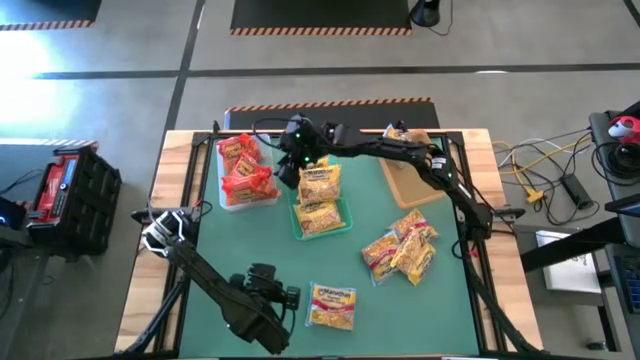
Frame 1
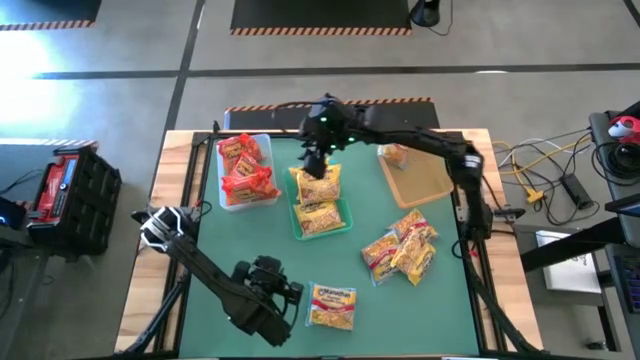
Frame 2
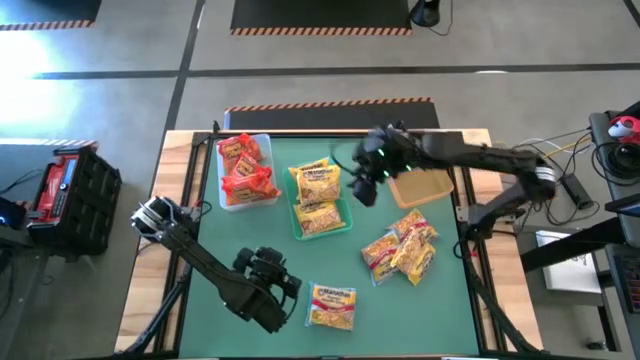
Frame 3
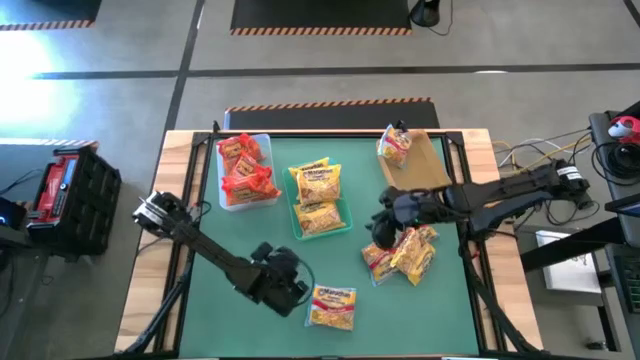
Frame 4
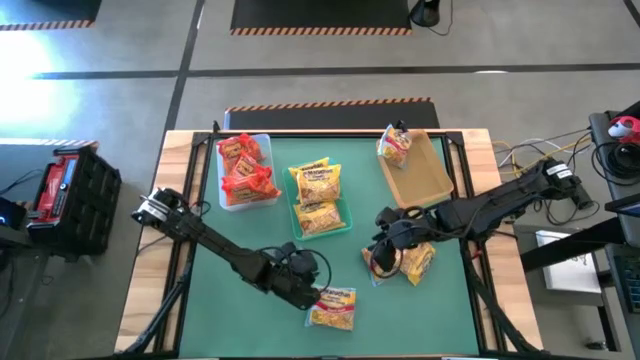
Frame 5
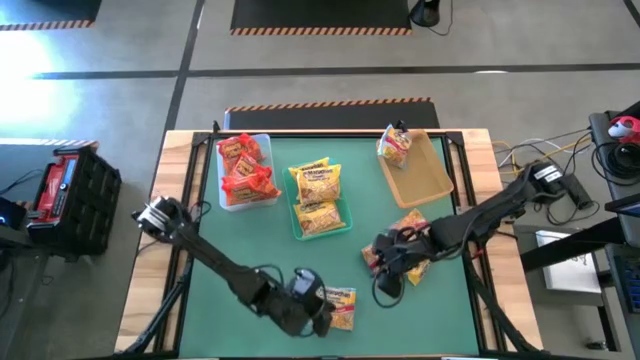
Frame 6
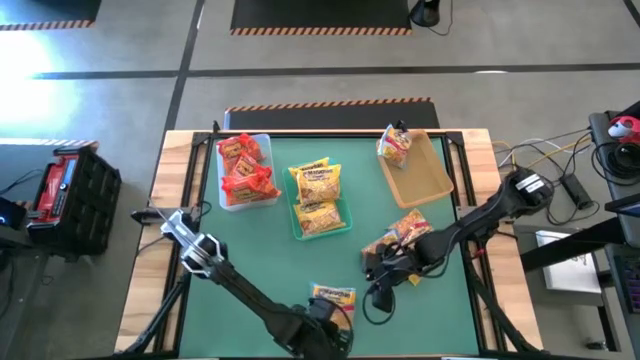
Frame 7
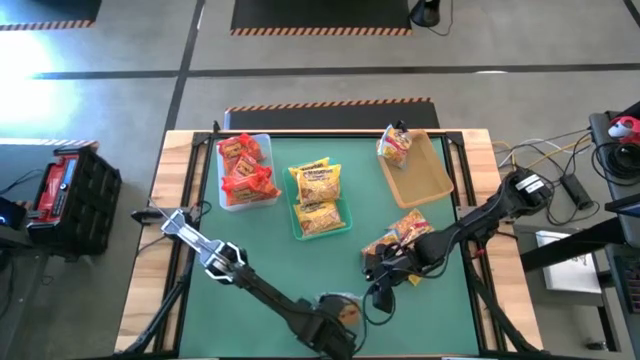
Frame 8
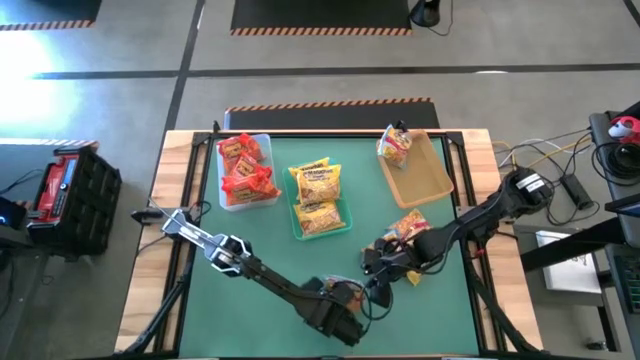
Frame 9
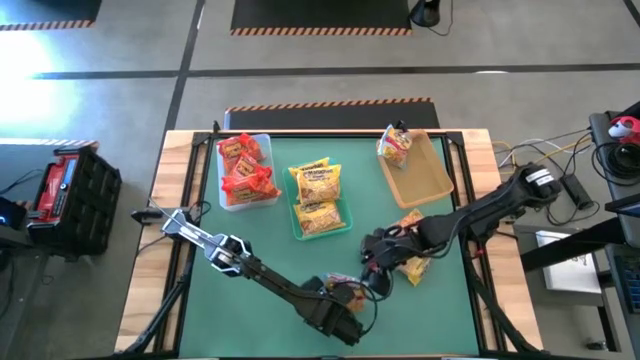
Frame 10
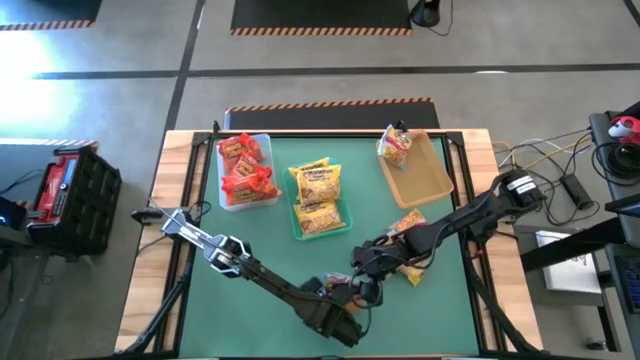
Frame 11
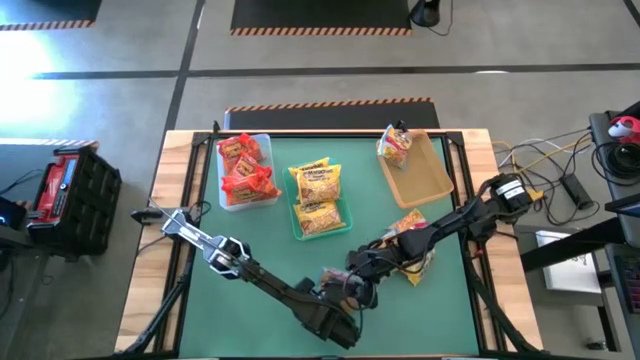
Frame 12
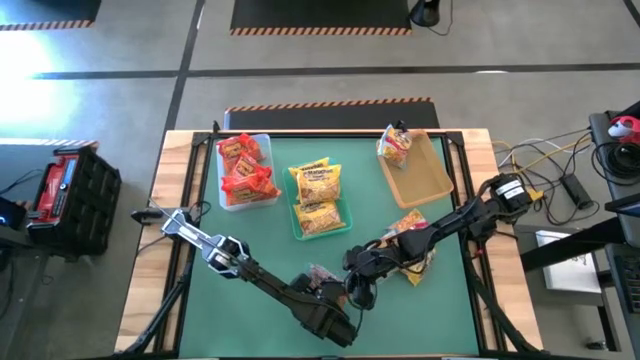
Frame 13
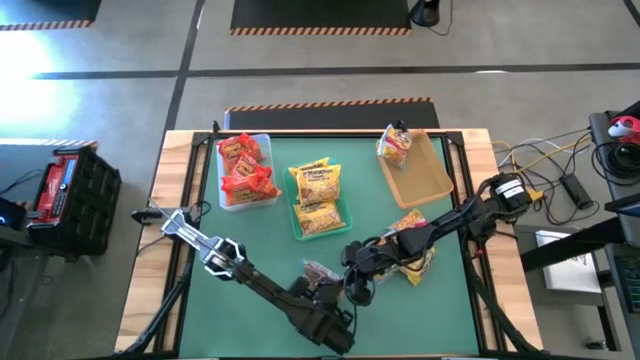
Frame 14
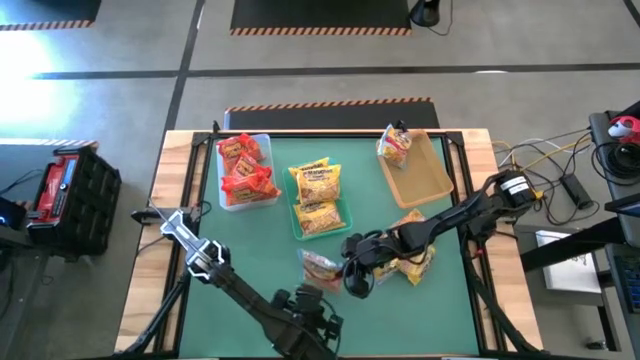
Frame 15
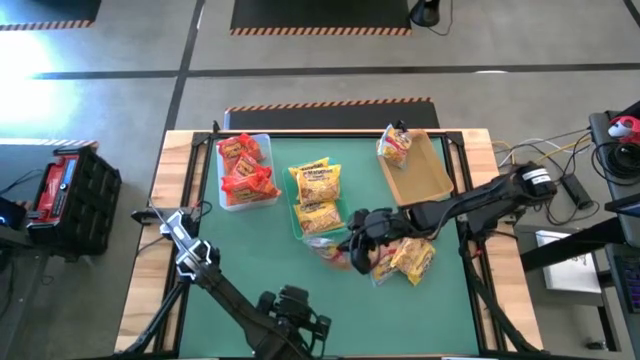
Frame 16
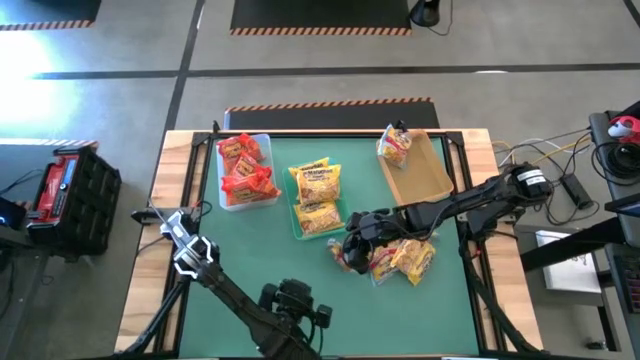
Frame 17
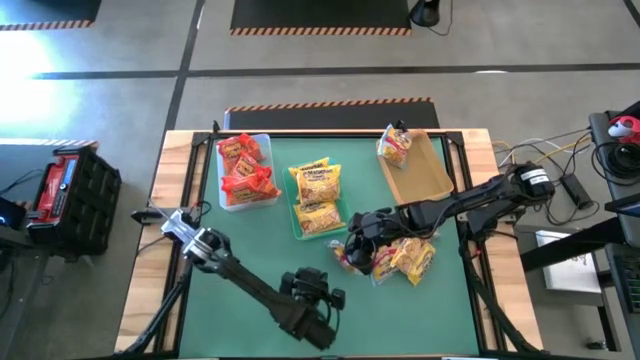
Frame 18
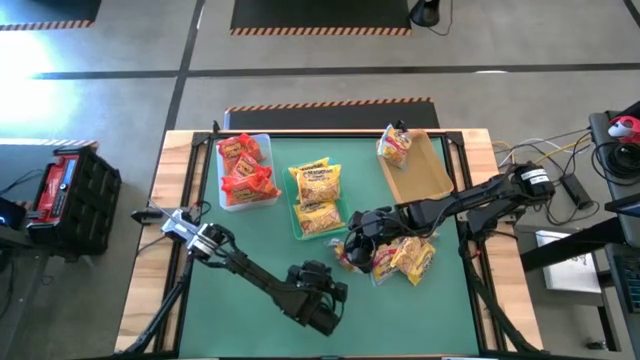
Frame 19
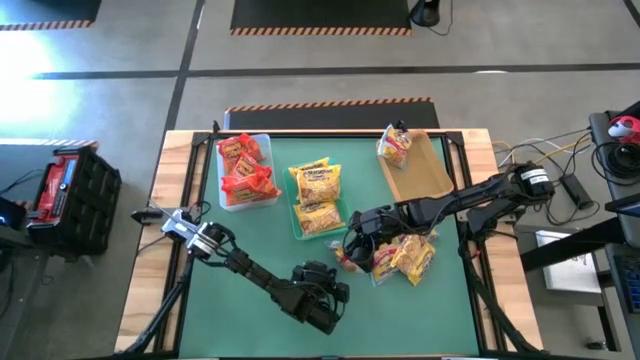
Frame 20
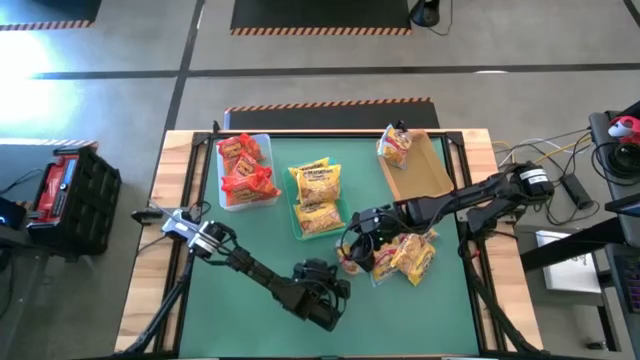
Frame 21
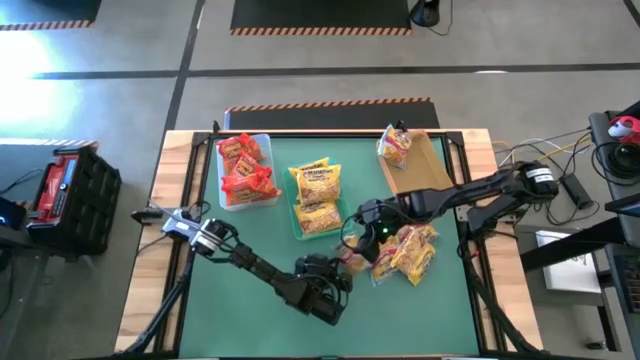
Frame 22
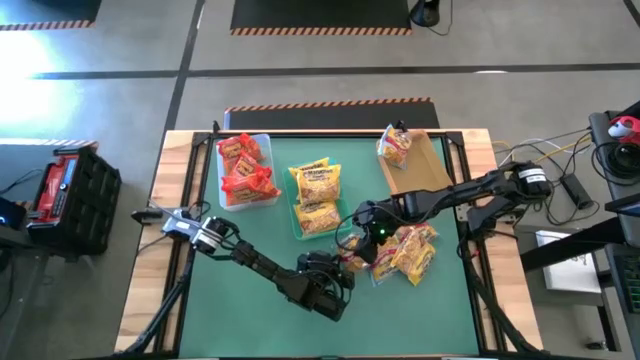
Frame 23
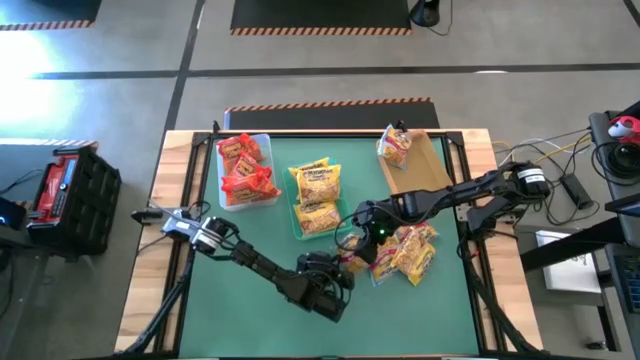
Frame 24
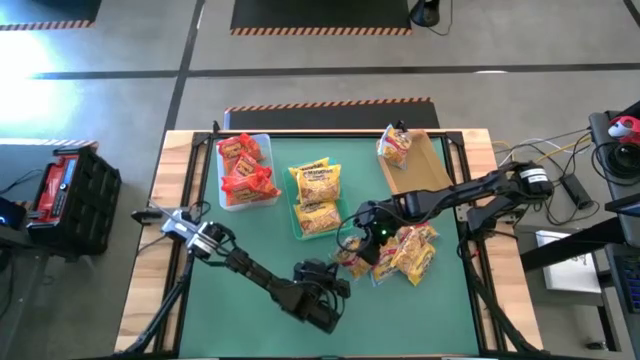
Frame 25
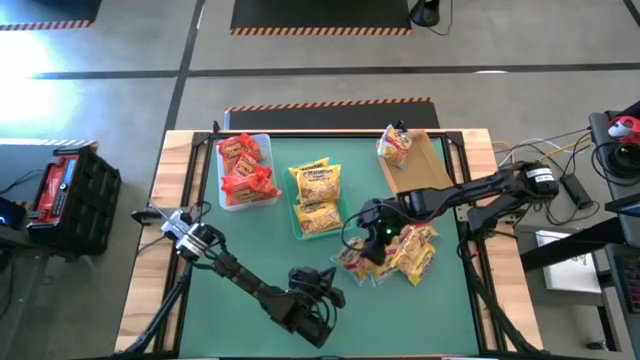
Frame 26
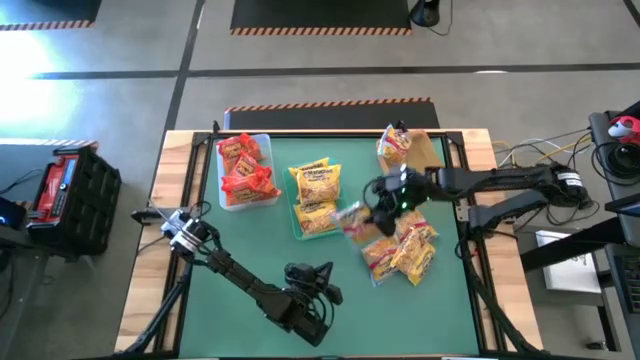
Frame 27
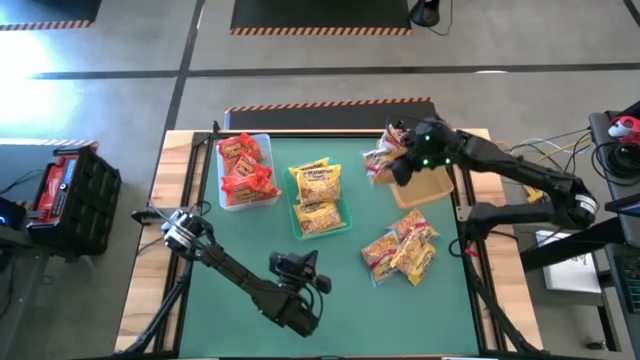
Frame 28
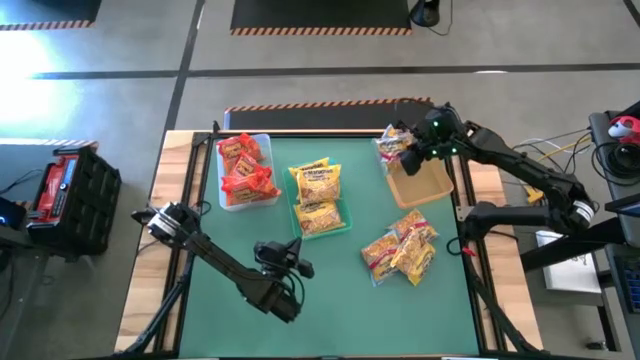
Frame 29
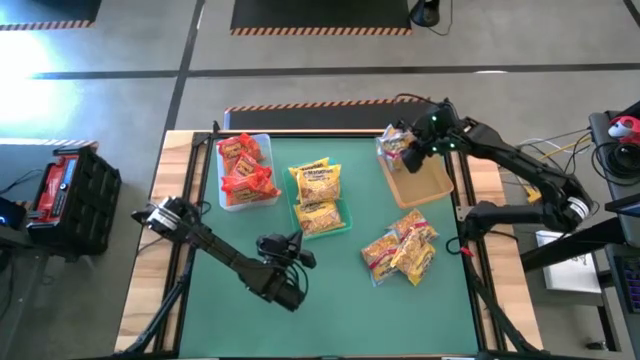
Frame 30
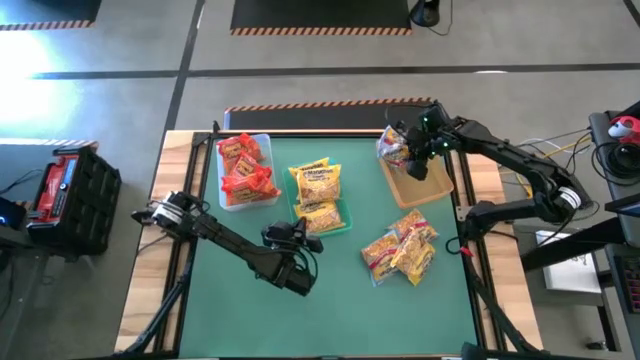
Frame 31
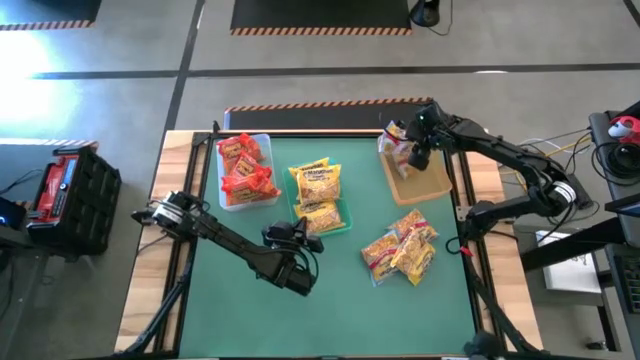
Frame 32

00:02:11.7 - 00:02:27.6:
Task: Sort Maruchan noodles
Put the blue noodle pack into the orange bin

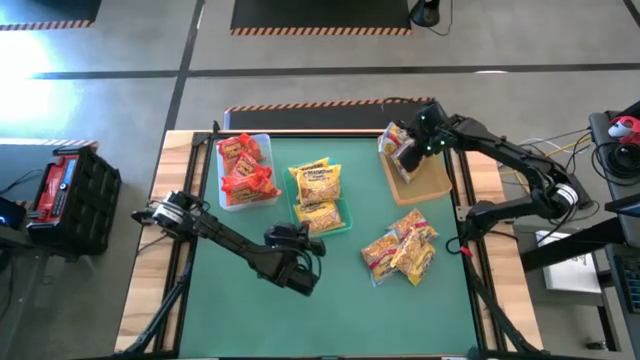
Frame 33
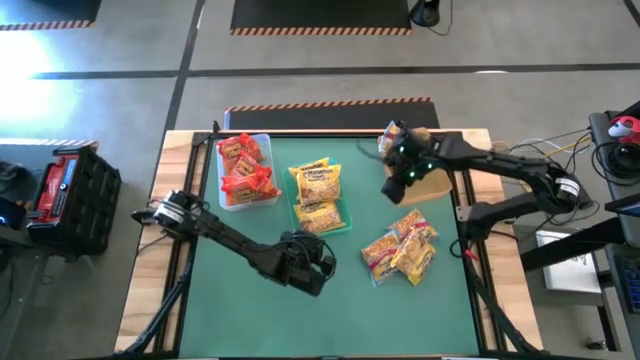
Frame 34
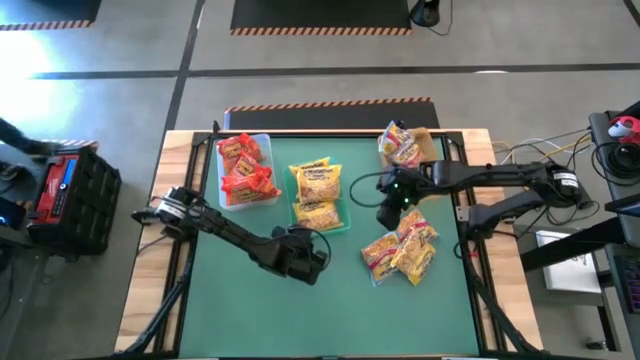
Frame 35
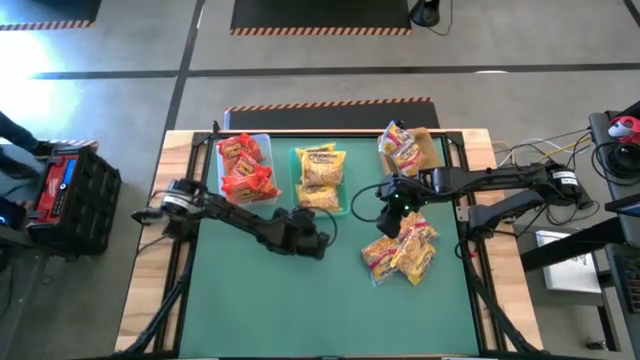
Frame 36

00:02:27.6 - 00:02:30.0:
Adjust the blue bin on the table

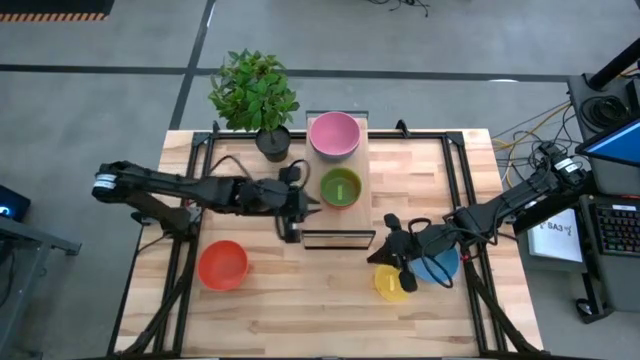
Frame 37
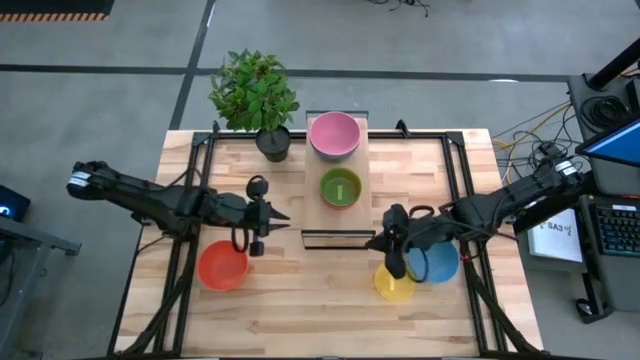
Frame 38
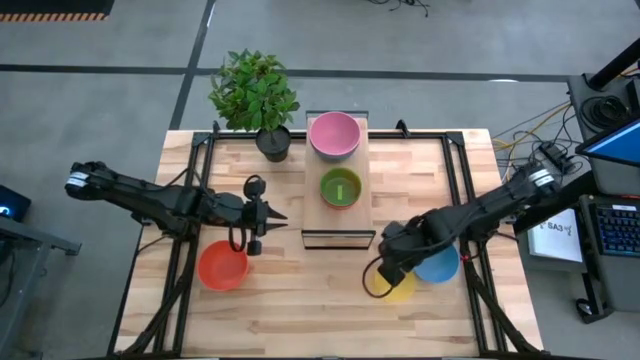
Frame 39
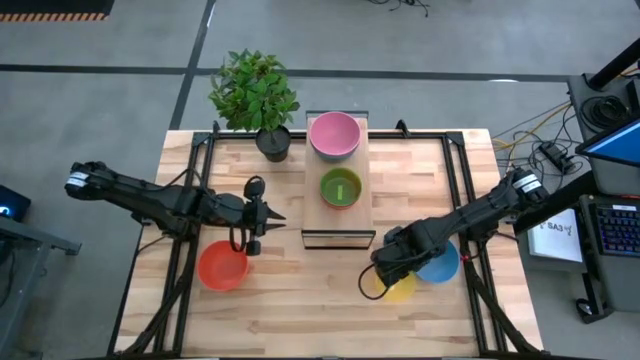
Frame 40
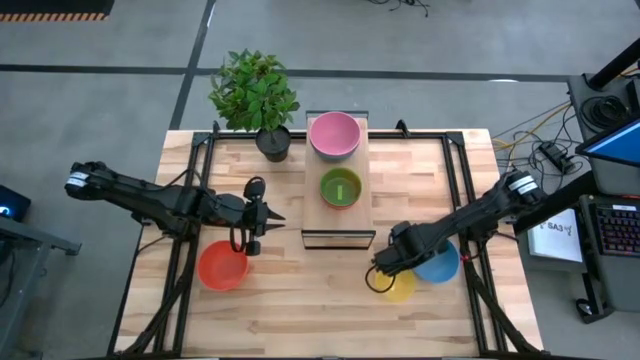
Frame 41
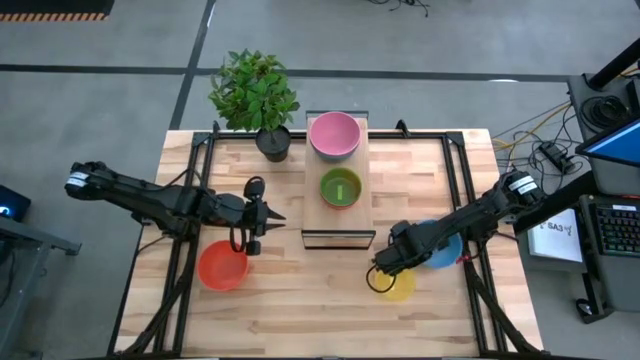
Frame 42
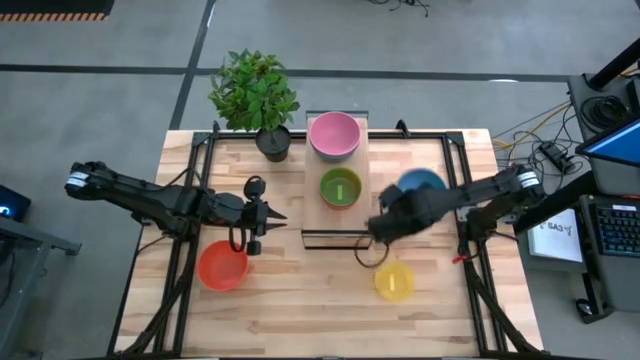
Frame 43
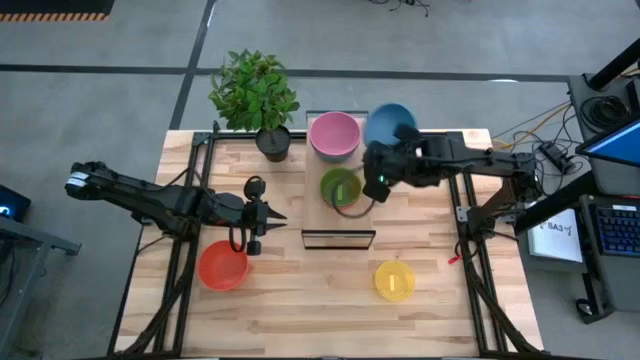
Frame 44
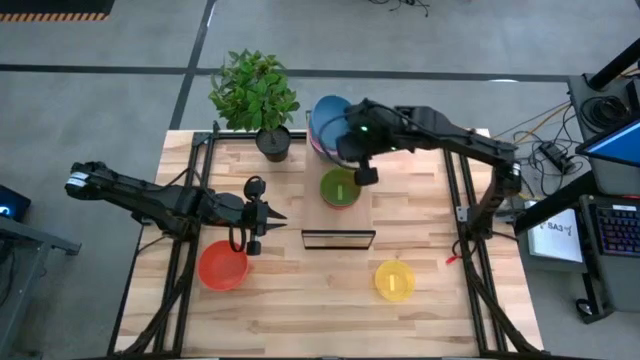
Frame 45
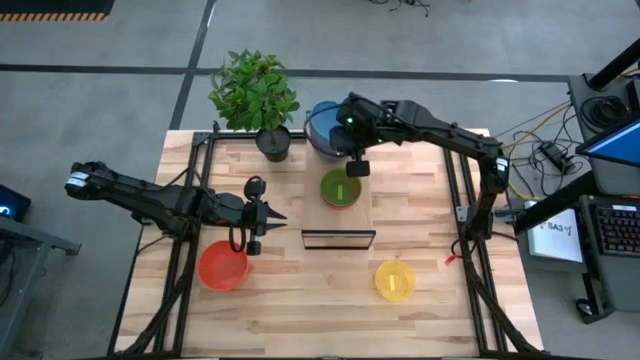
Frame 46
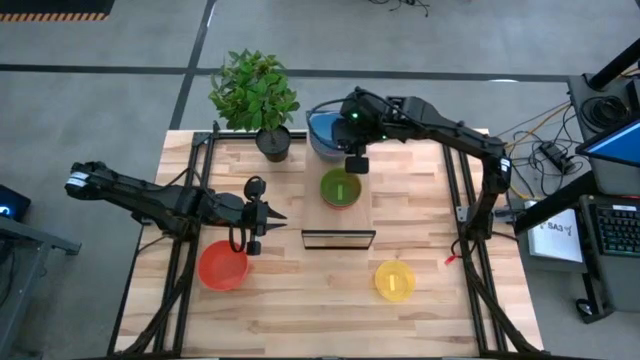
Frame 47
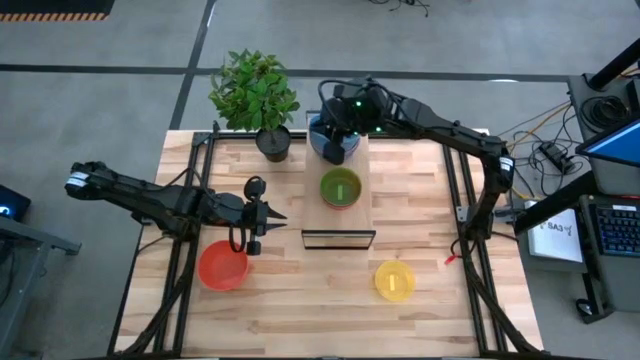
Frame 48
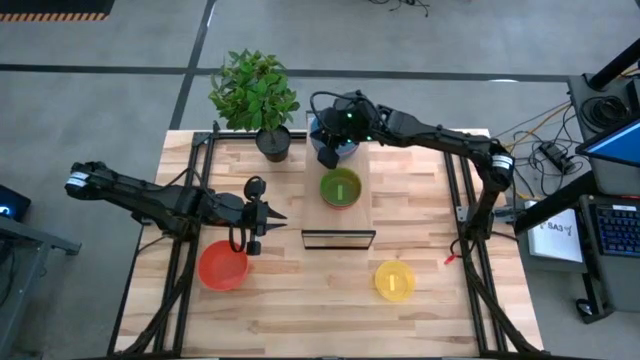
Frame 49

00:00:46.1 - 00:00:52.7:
Task: Place and stack bowls onto a shelf
Stack the blue bowl into the pink bowl on the shelf
